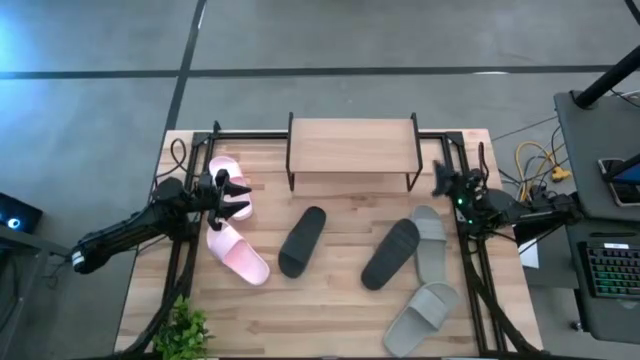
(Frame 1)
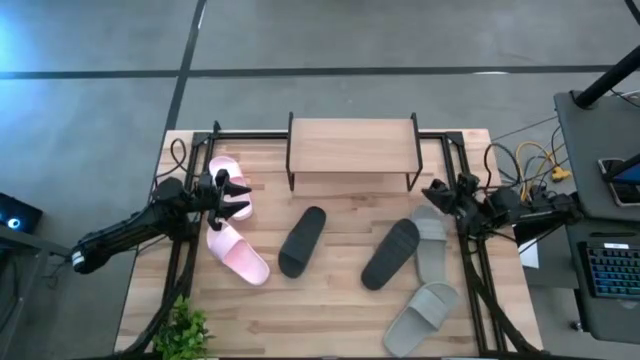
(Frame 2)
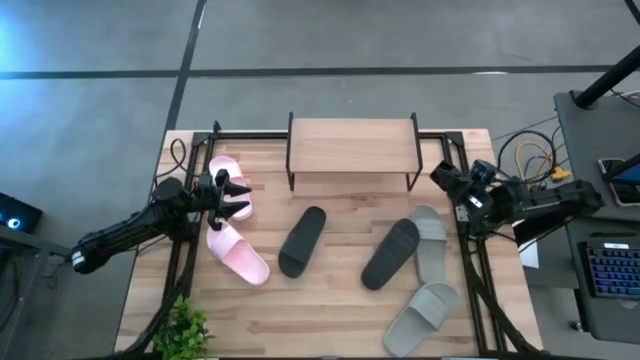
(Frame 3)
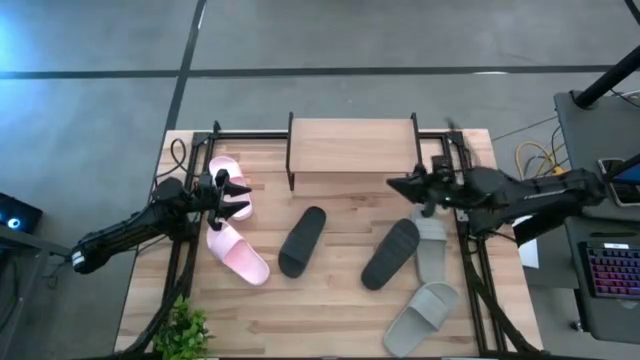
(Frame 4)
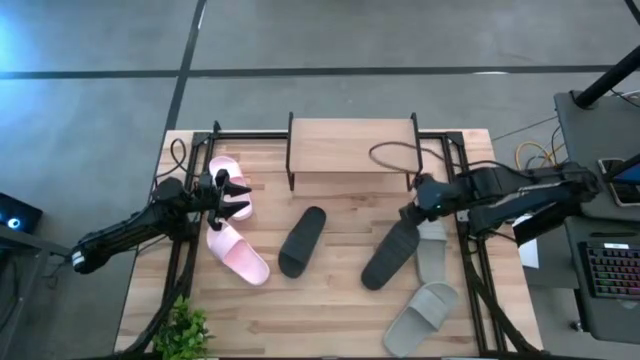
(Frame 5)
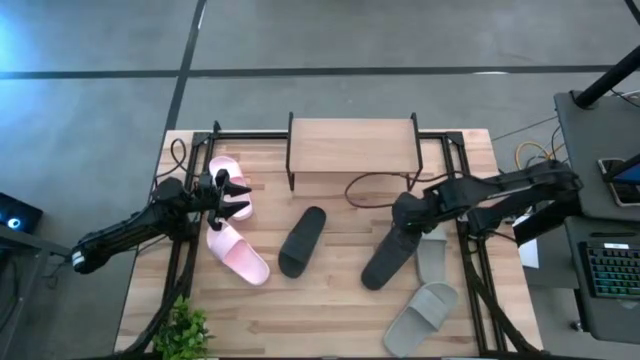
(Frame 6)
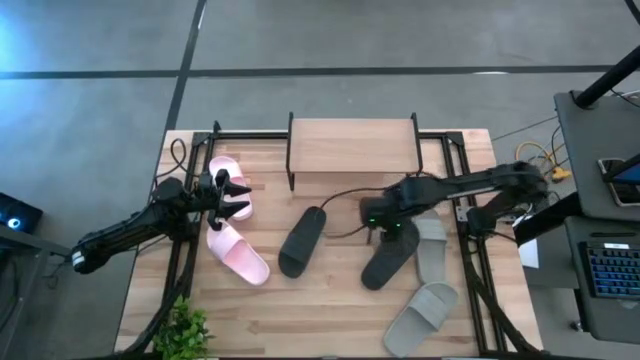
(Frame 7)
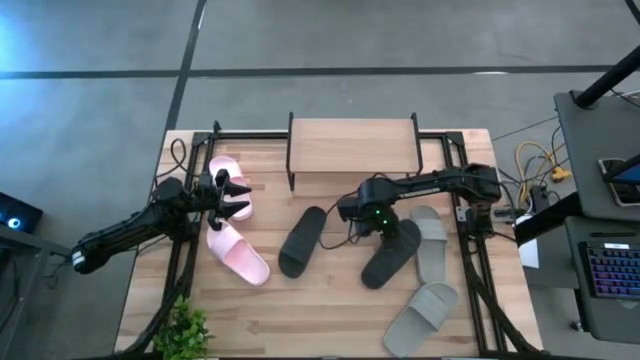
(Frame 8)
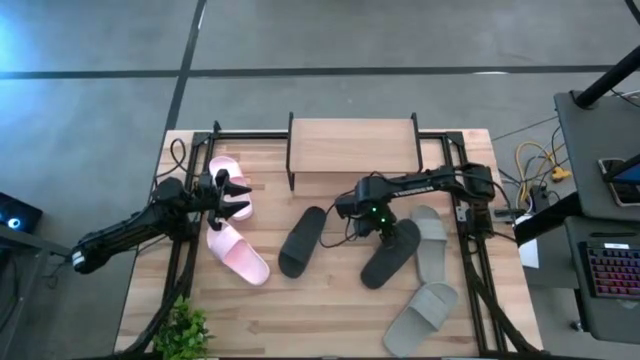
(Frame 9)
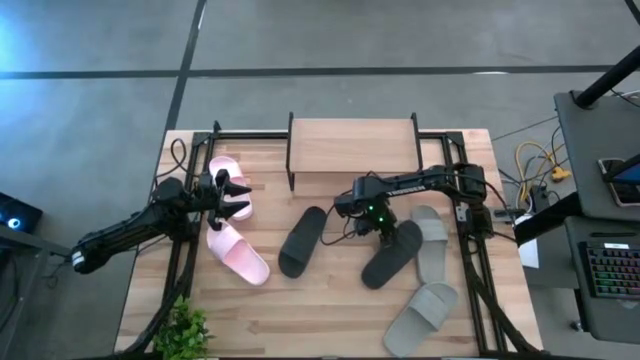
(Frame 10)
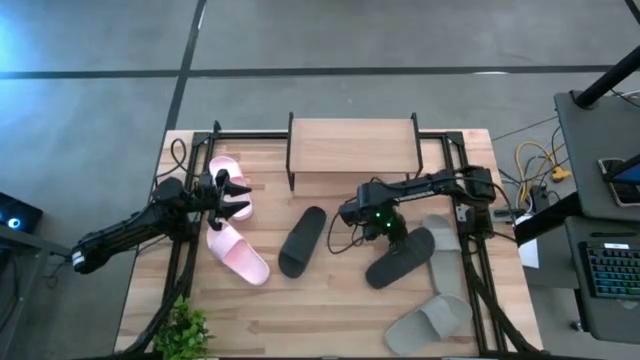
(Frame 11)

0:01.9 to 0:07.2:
Task: Pick and place slides into the shelf
Put the right black slide on the shelf

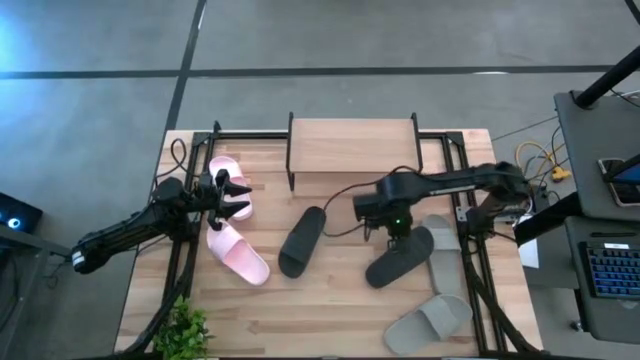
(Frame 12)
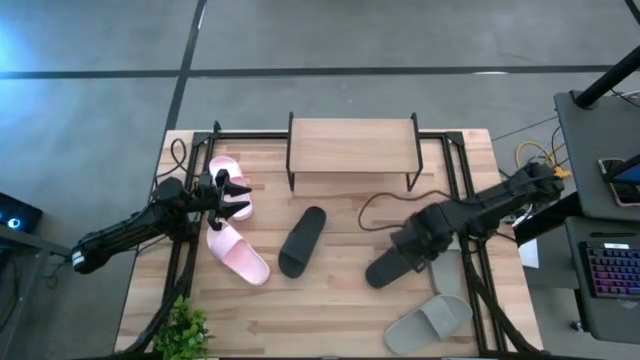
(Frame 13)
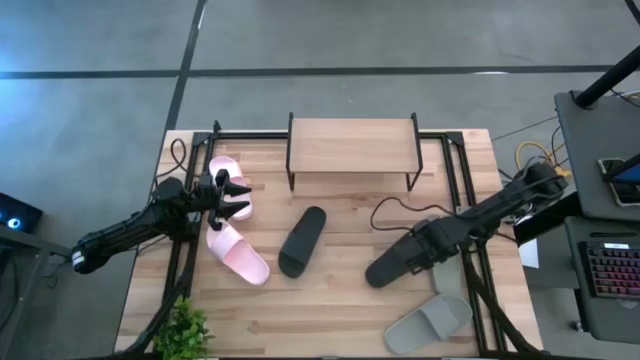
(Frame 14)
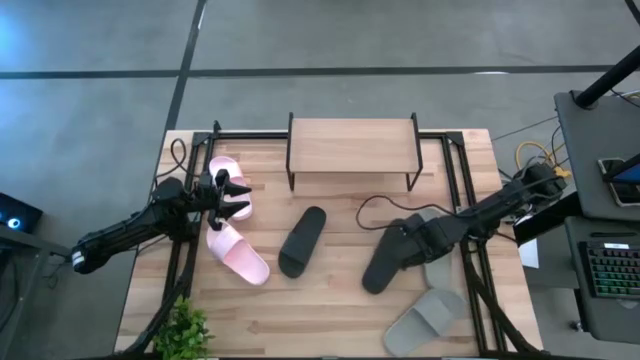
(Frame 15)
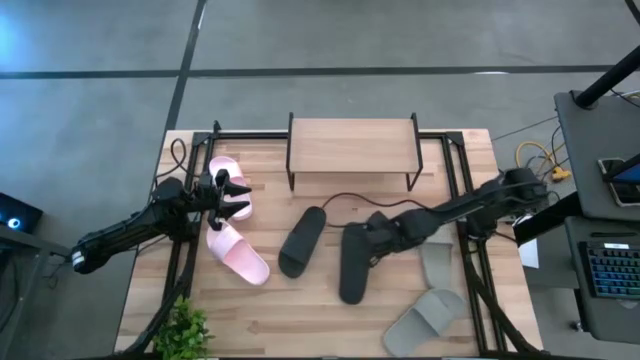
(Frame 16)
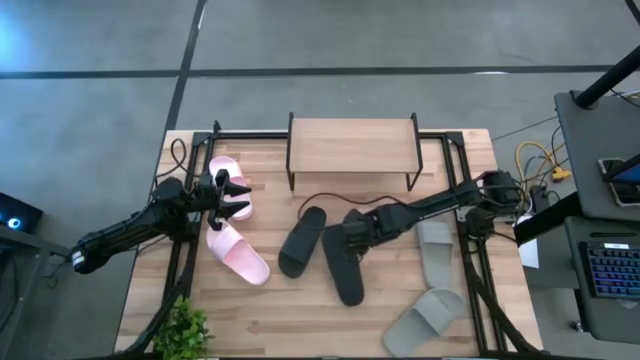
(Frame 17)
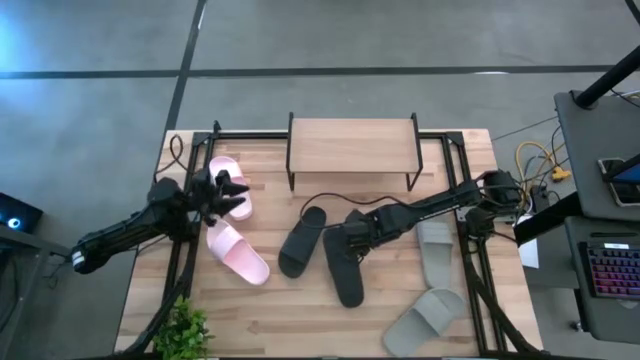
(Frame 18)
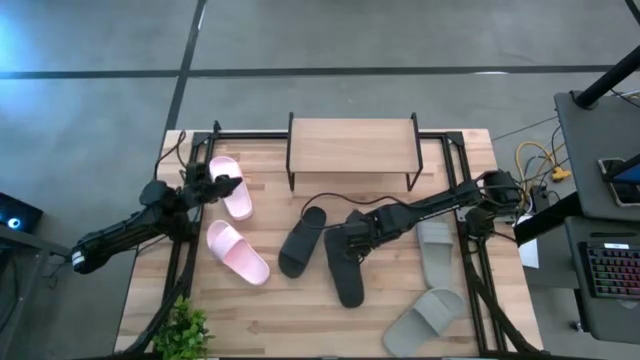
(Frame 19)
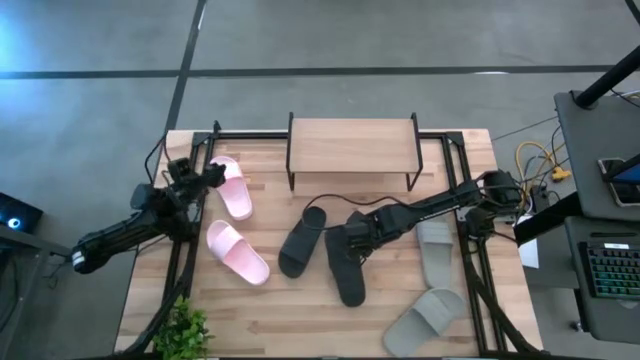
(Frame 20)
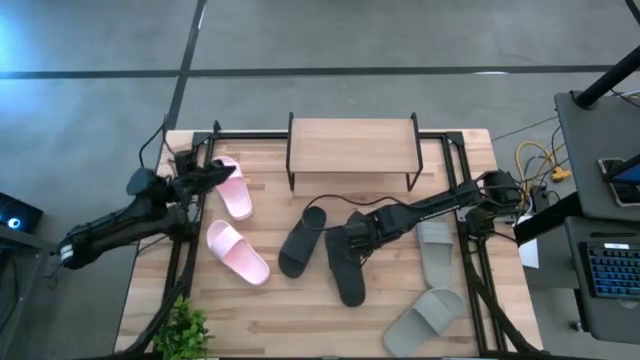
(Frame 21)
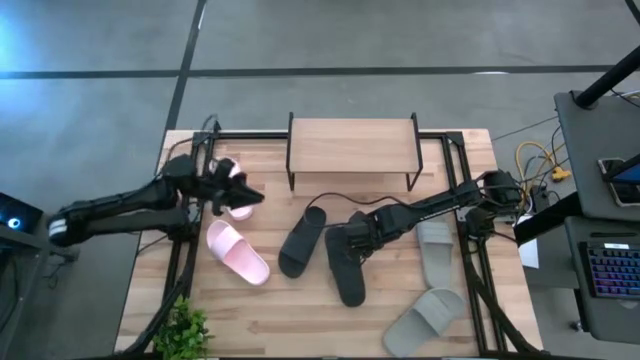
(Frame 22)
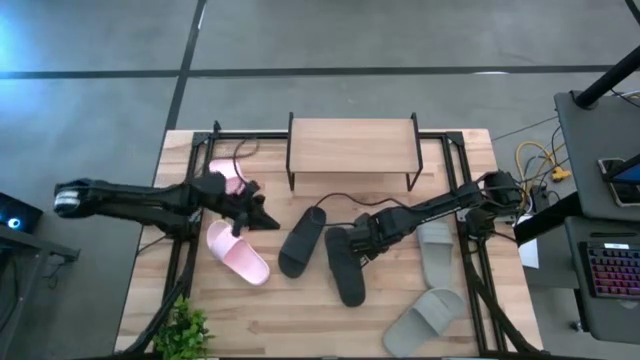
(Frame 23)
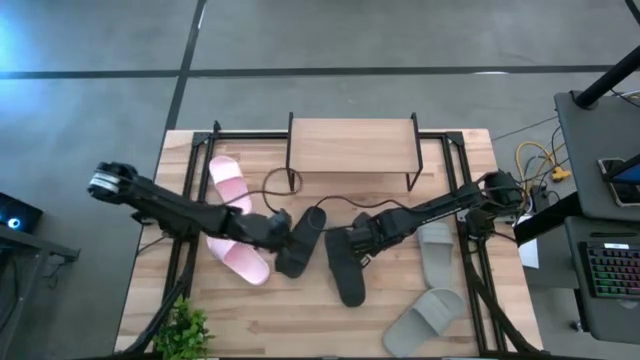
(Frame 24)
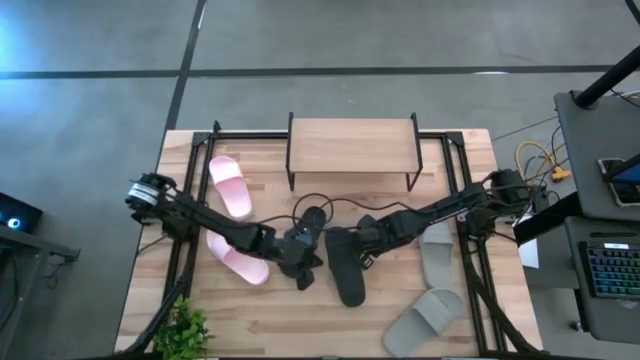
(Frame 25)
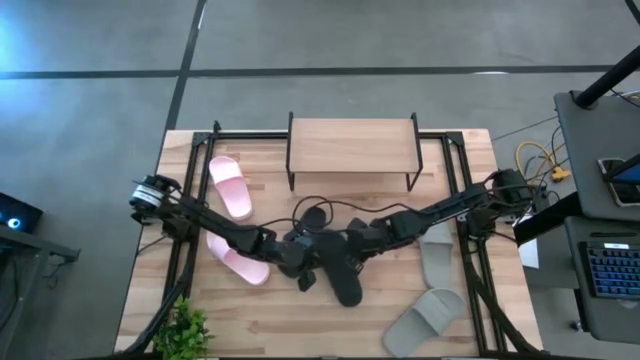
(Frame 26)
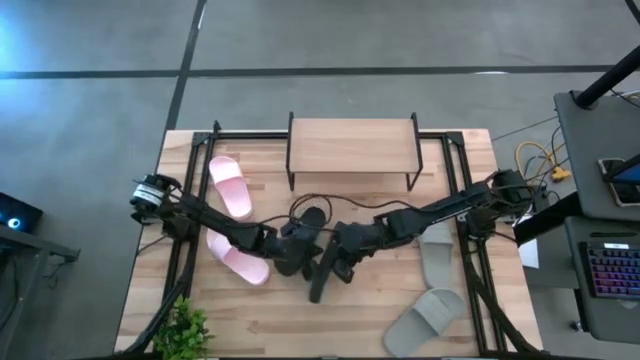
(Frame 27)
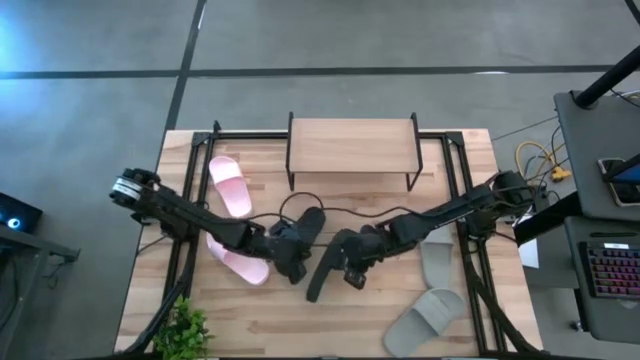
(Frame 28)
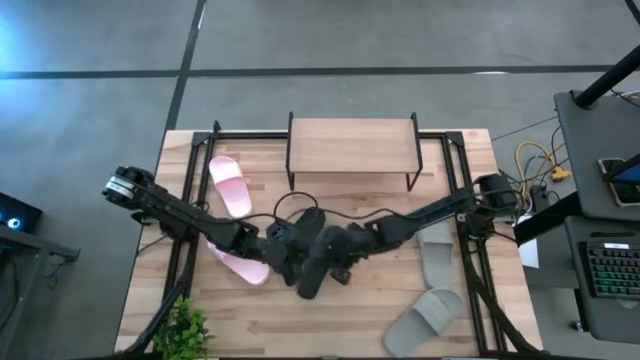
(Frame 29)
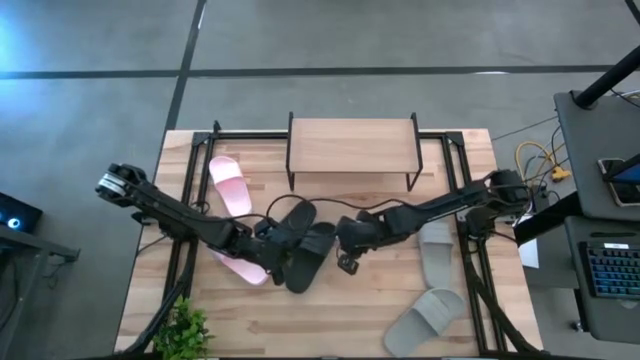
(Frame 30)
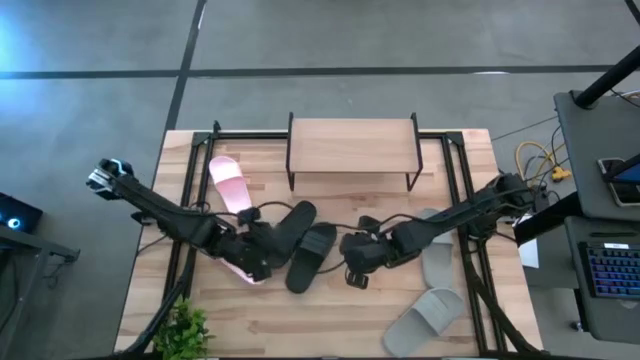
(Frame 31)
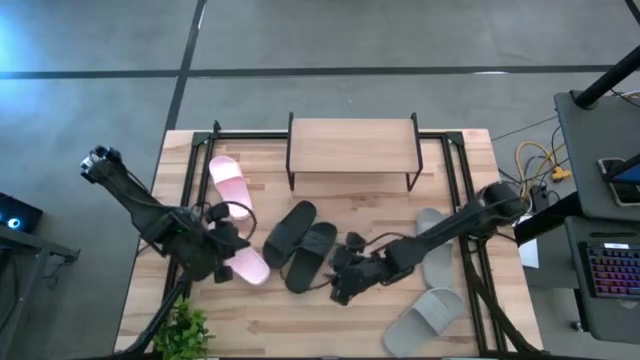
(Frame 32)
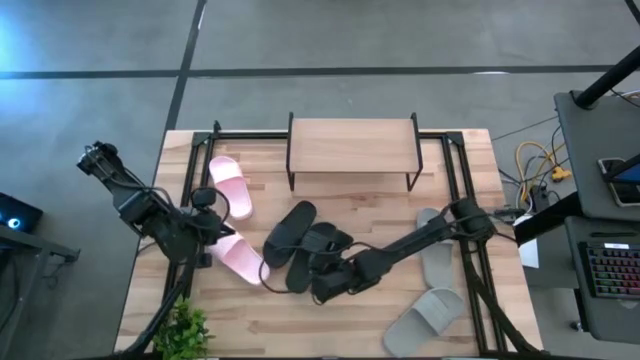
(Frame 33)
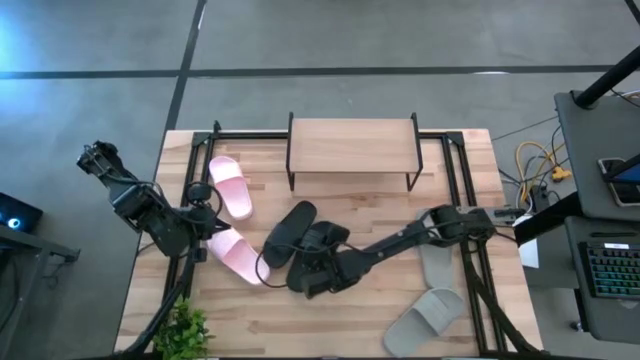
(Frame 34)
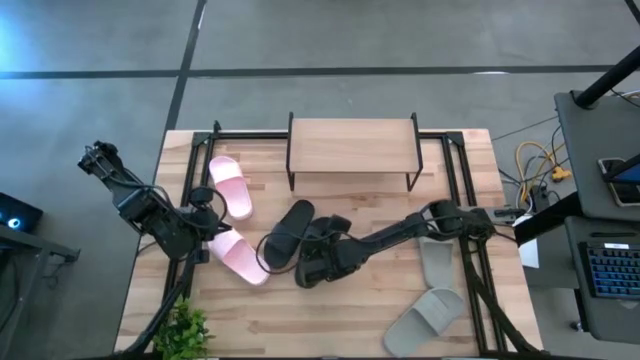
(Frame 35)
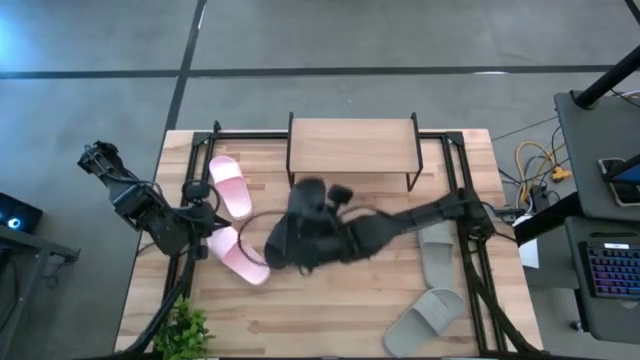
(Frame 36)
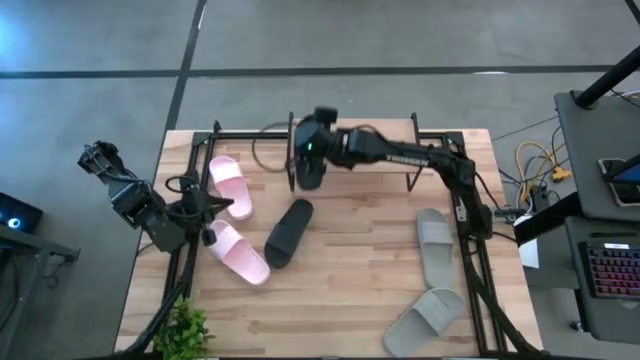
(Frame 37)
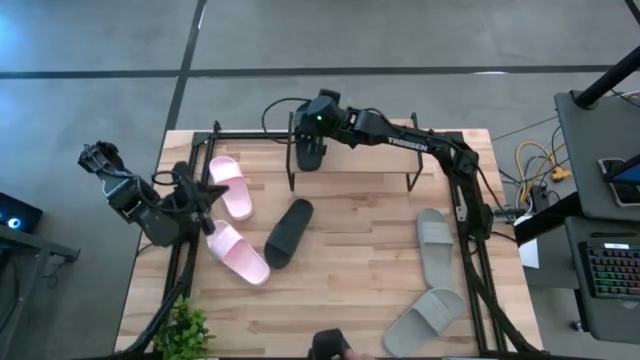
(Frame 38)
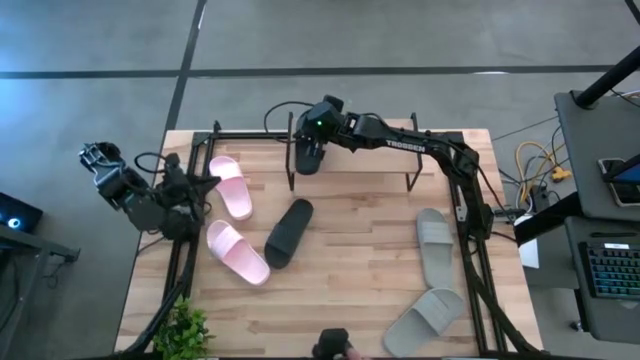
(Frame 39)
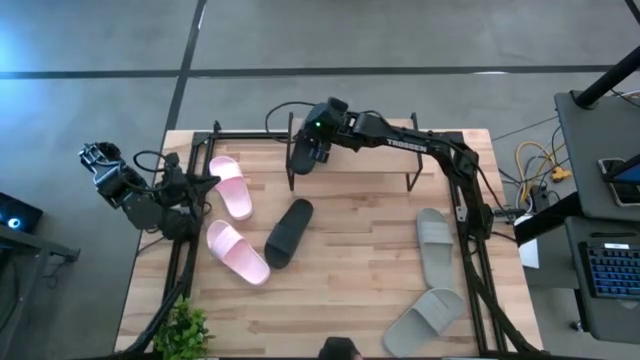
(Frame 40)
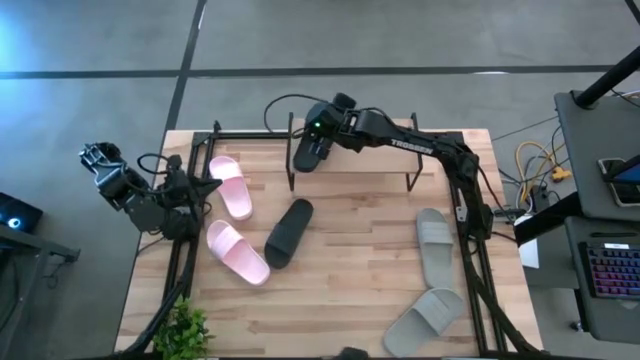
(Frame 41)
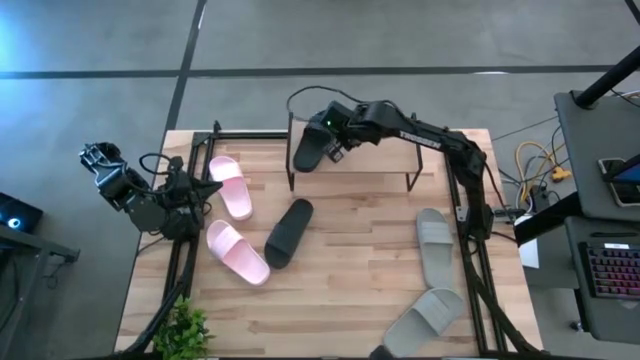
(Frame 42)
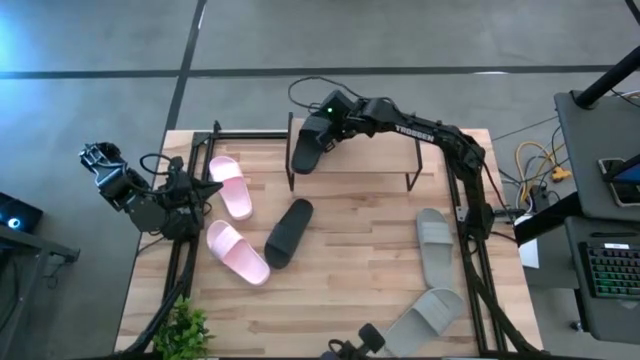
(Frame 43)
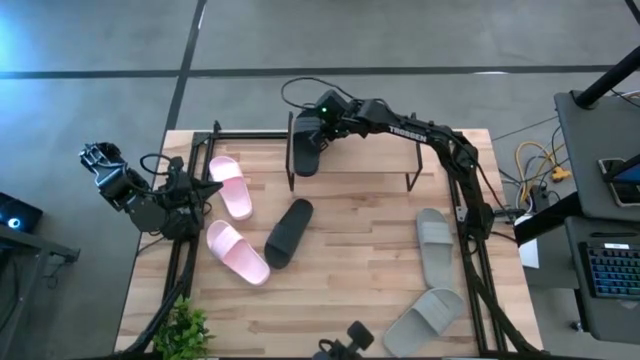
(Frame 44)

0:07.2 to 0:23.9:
Put the right black slide on the shelf
